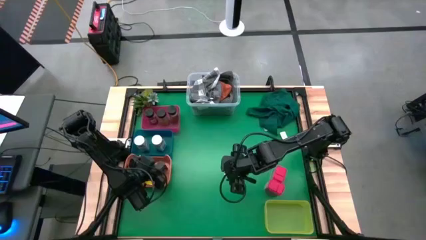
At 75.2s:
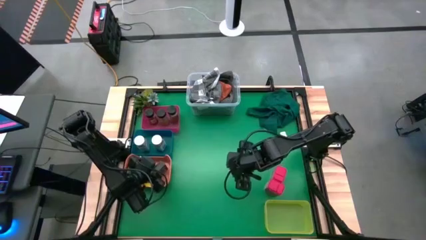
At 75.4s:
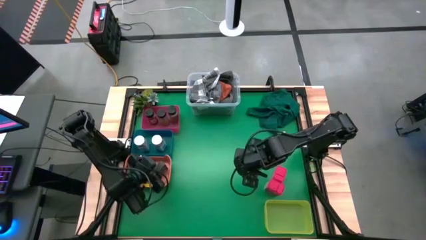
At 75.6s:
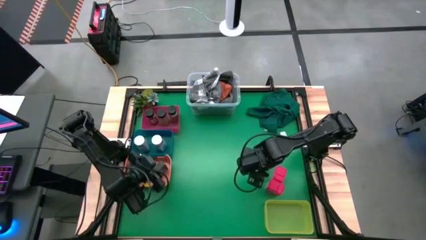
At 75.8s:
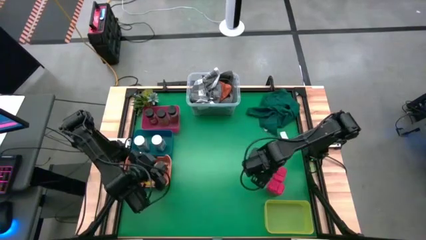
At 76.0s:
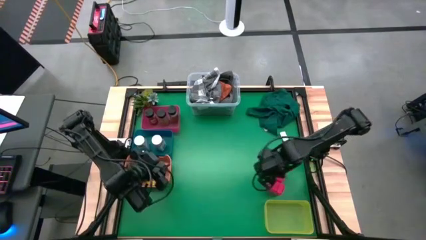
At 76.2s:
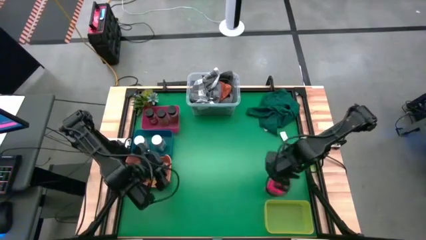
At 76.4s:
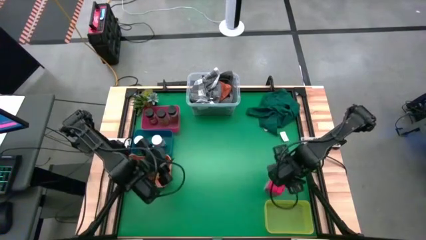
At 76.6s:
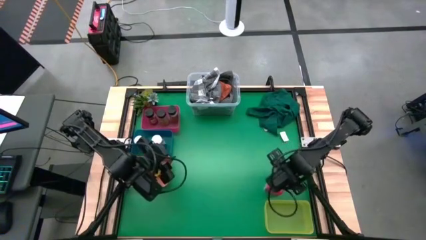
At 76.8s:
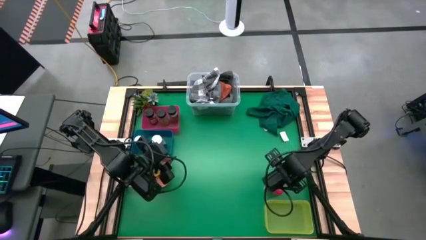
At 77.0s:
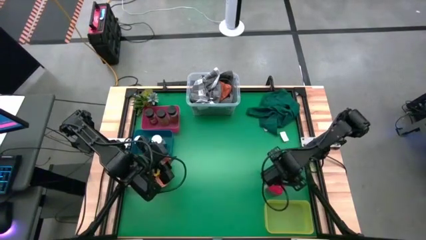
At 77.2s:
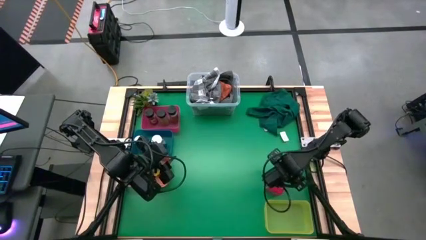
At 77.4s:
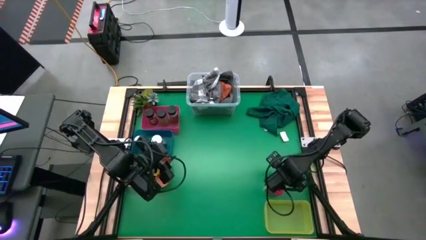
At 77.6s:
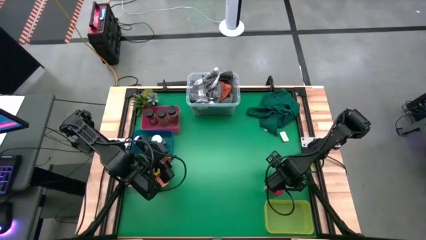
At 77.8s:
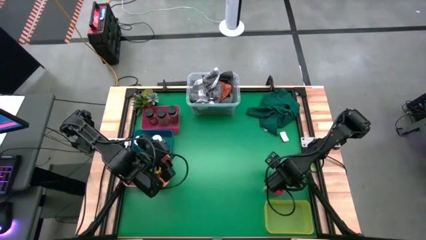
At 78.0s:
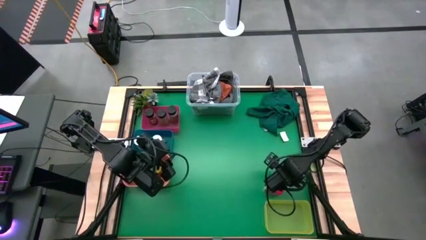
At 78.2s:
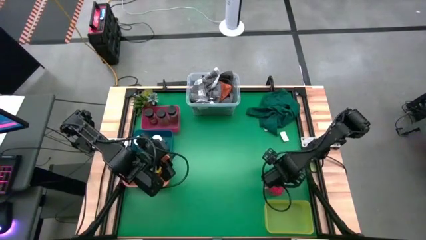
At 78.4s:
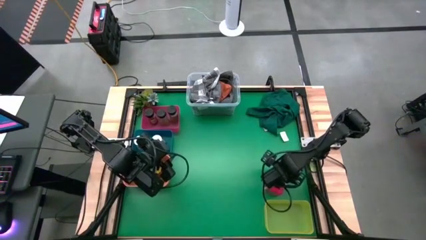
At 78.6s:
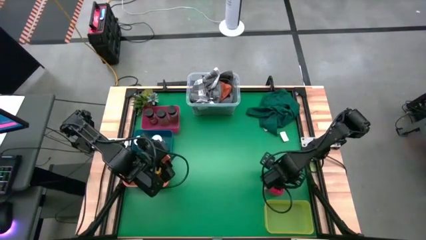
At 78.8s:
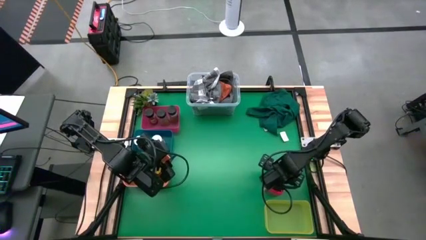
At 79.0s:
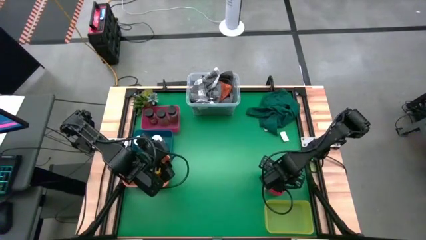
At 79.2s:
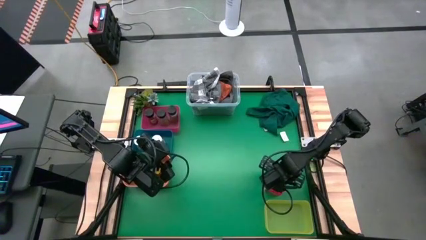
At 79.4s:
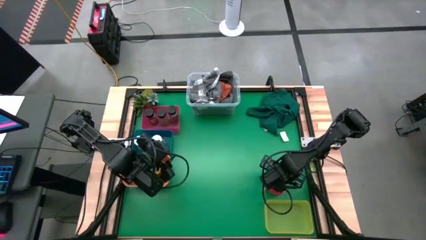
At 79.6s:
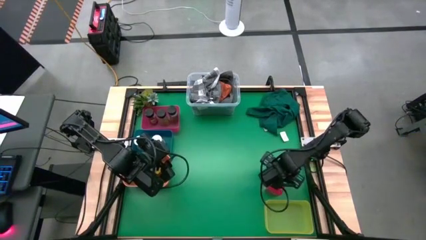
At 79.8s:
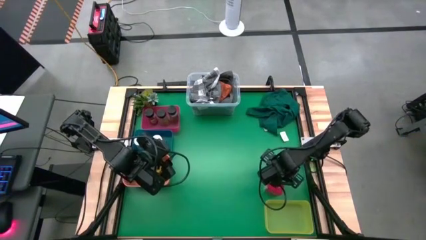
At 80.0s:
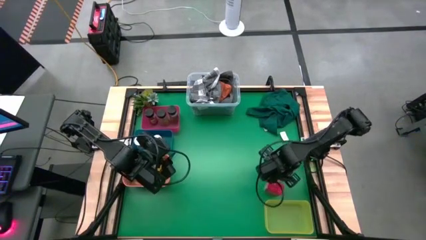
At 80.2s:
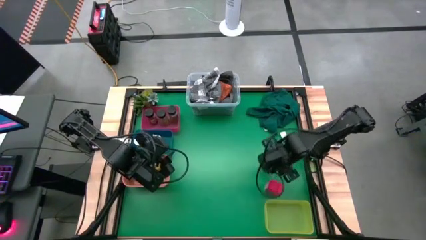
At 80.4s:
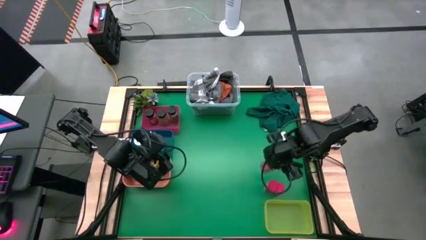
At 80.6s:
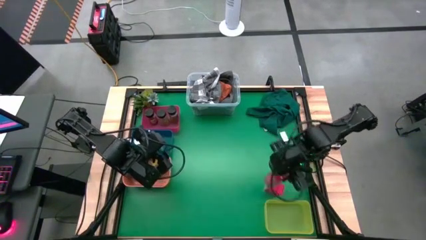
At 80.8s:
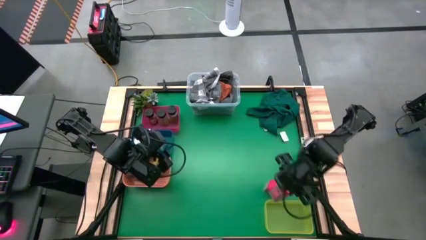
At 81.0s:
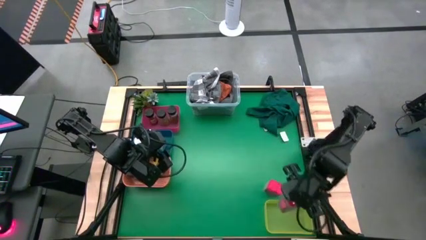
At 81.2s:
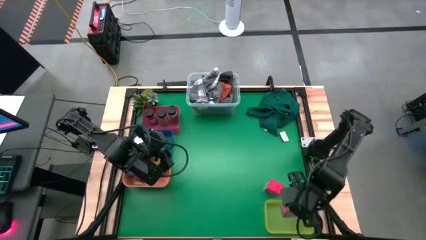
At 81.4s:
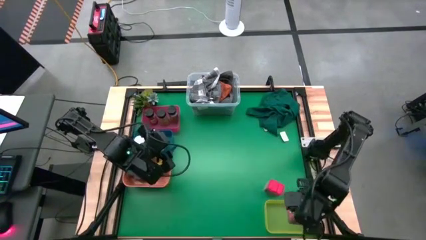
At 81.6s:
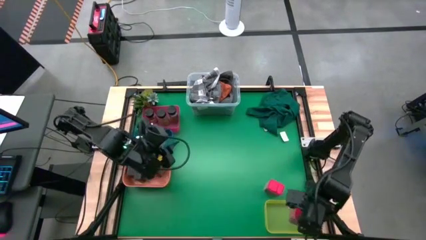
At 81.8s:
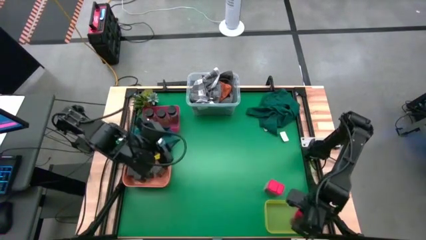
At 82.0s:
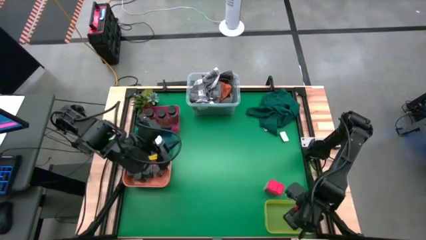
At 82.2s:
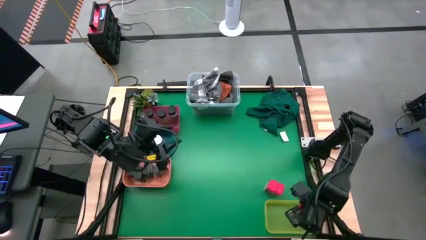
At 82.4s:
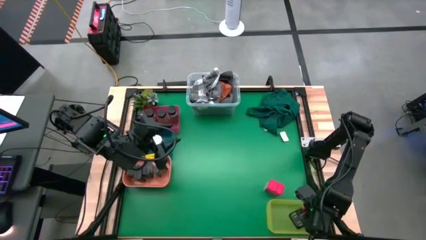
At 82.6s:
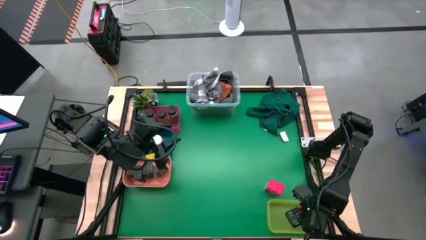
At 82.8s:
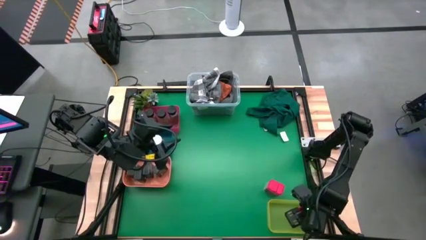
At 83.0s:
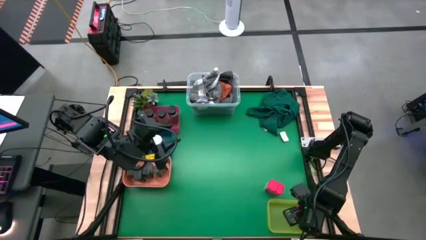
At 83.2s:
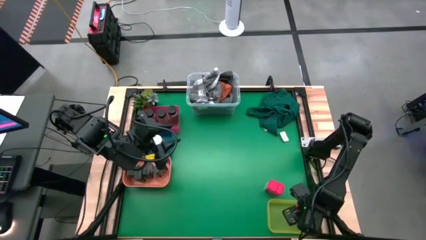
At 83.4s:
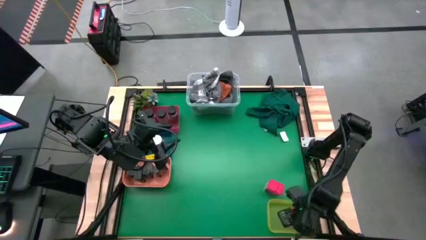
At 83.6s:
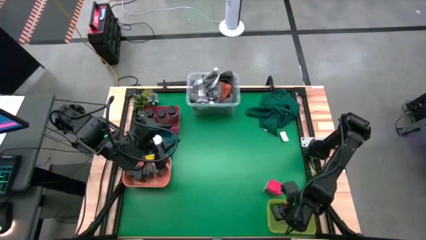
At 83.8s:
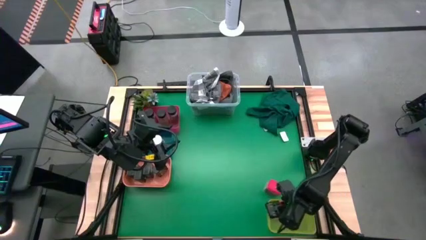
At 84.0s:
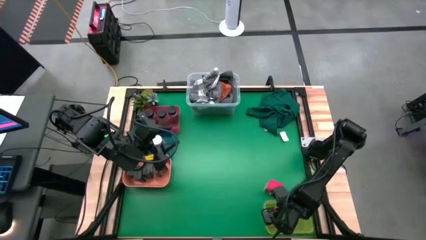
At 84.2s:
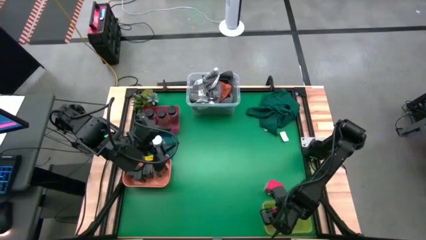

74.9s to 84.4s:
Task: Sort spices by type
Put the top red spice can into the yellow bin

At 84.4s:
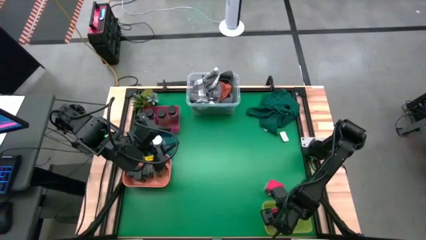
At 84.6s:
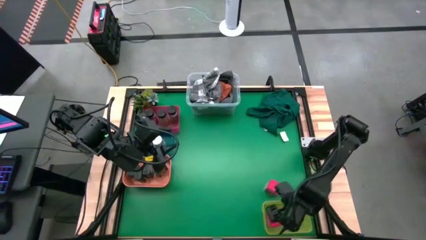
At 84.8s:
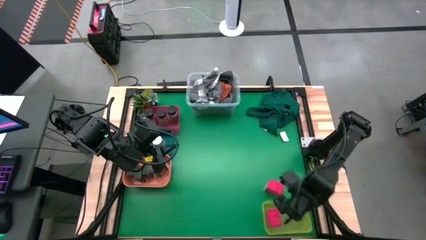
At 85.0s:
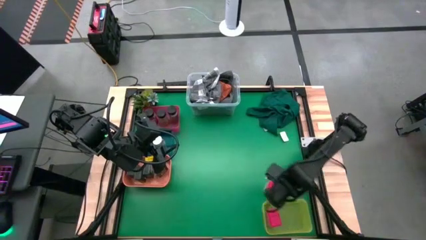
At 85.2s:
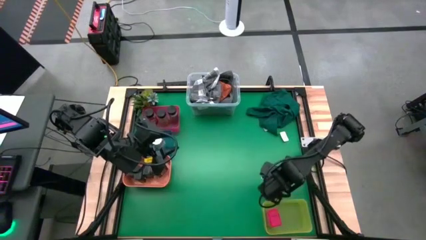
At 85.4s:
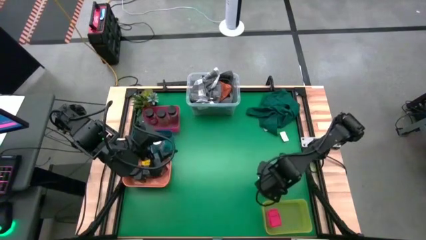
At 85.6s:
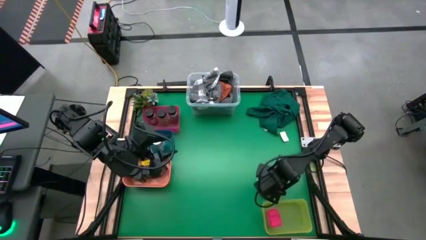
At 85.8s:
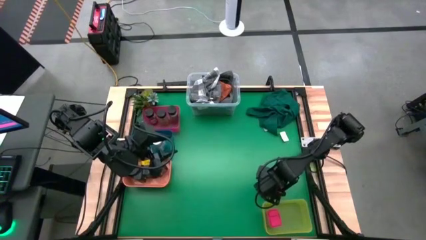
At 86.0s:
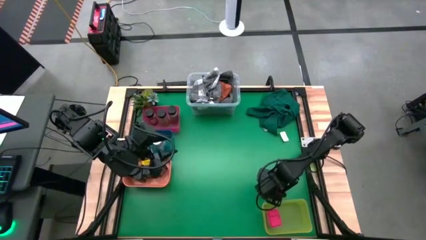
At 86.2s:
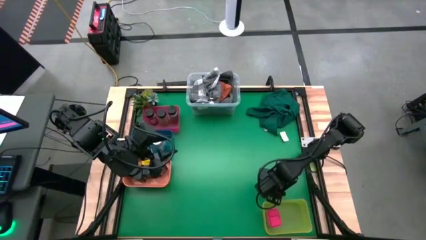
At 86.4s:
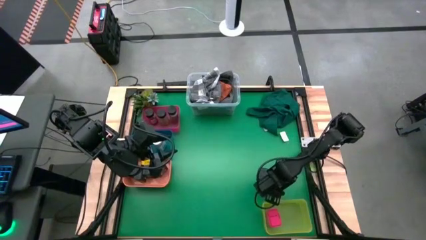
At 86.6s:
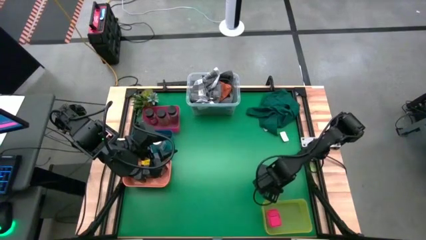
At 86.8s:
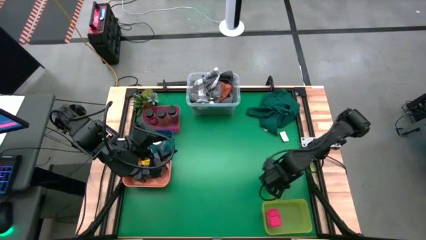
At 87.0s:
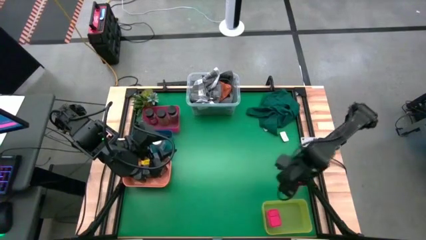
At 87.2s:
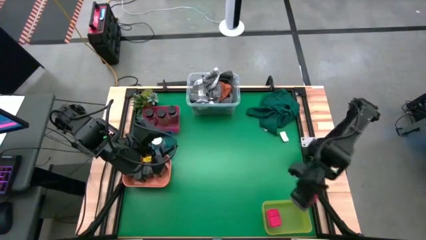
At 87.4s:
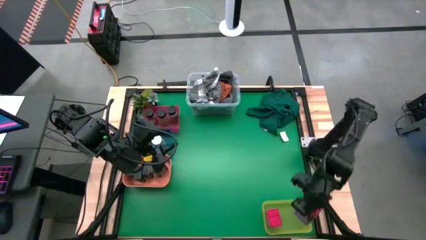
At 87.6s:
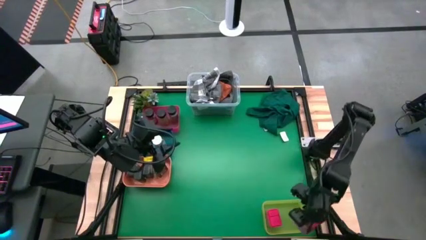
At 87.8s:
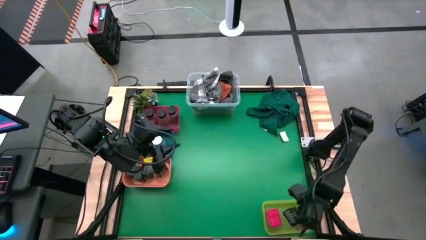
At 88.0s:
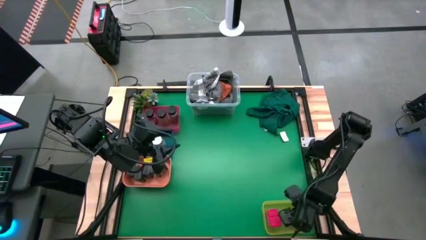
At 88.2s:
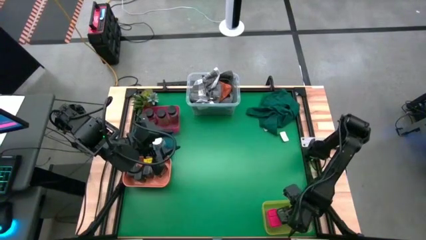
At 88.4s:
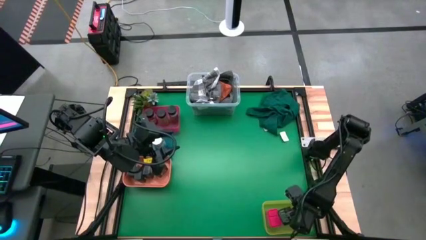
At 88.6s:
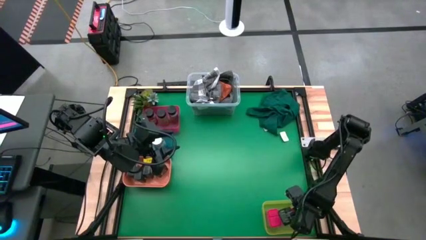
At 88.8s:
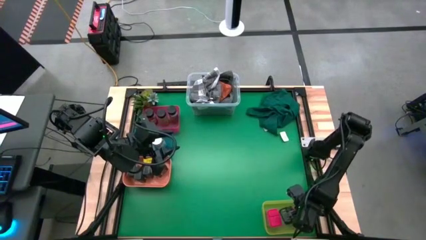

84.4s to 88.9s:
Put the red spice can into the yellow bin

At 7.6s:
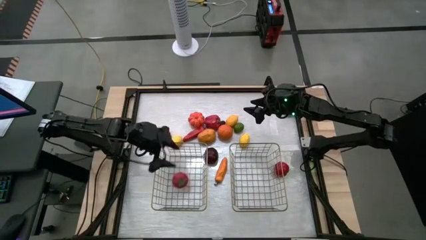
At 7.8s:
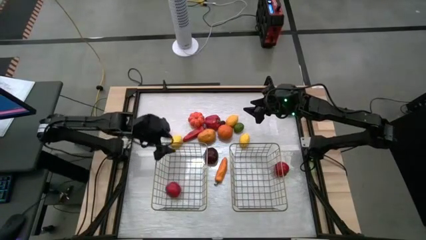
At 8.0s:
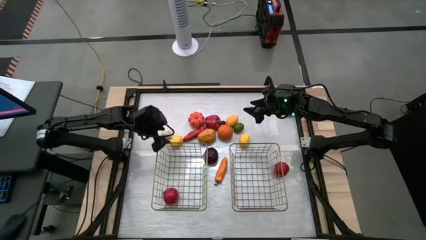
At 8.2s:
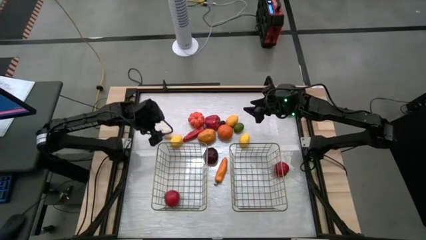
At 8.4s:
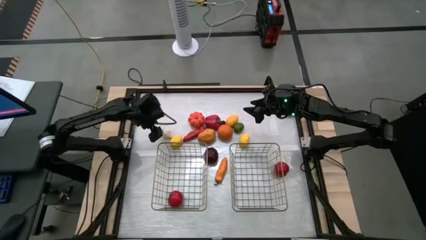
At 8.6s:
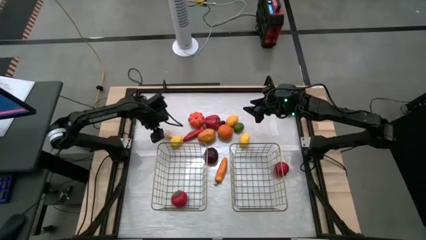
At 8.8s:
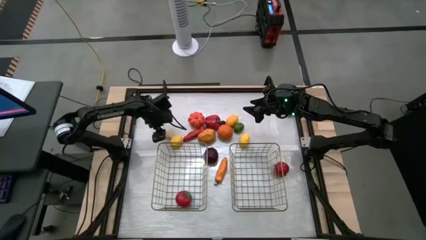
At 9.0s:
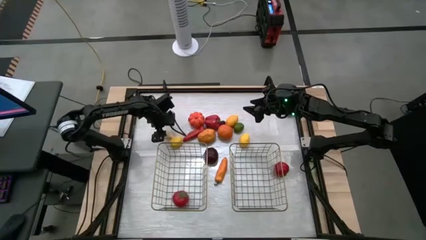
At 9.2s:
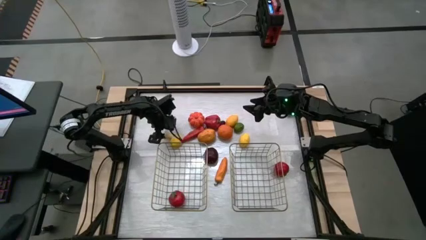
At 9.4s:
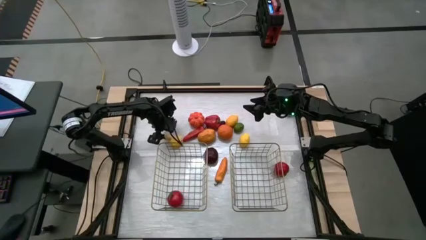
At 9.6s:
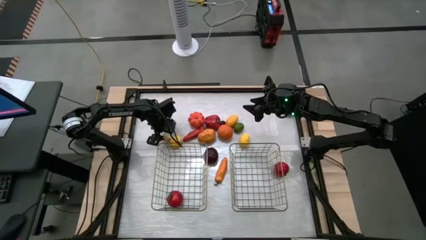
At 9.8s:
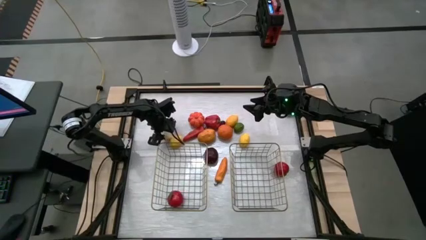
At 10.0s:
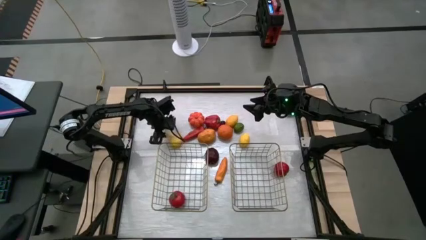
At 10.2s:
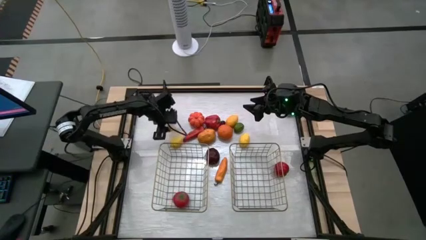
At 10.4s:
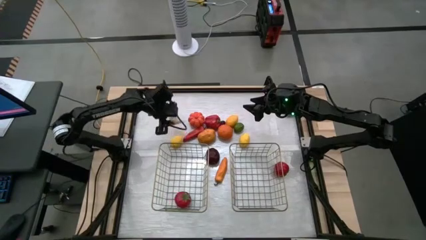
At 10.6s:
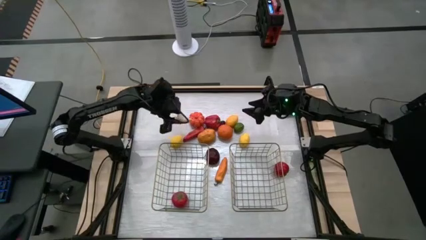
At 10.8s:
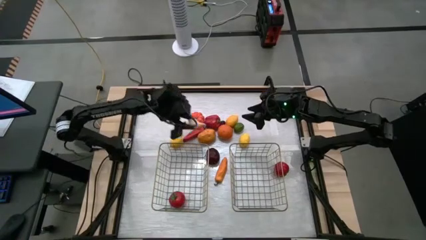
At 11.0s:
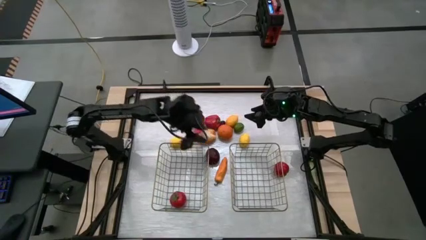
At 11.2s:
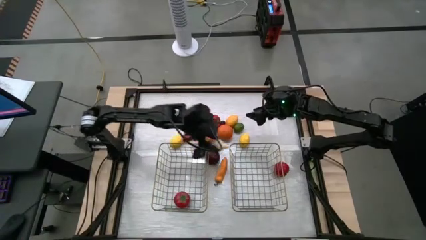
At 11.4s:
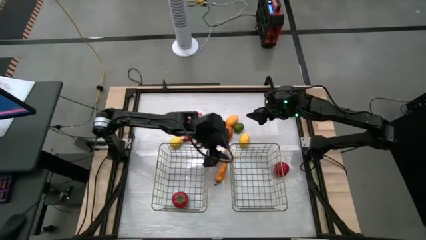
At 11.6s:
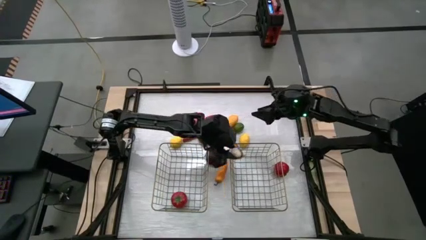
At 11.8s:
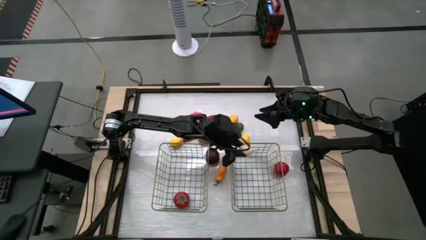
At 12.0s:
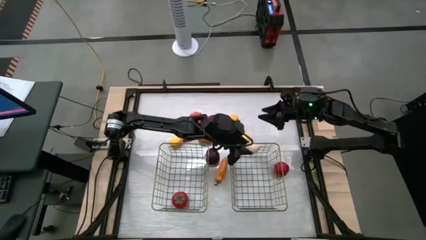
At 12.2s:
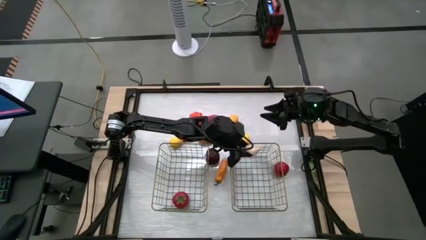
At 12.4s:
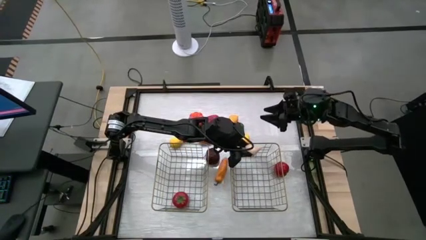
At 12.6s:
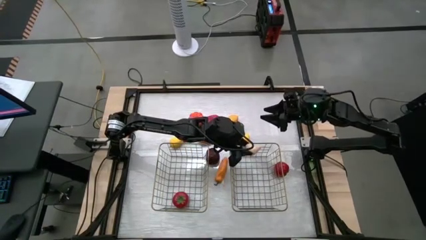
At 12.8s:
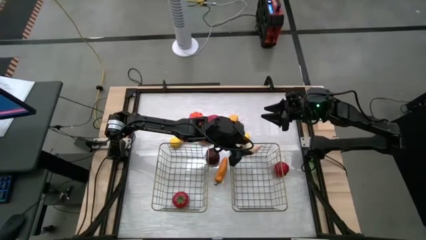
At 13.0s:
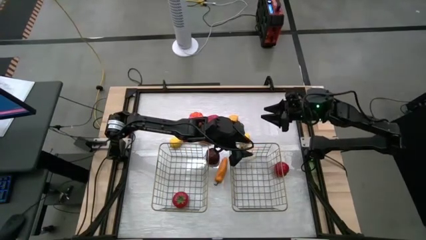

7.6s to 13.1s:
Task: Sort produce into baskets
Put the garlic into the right brown wire basket
